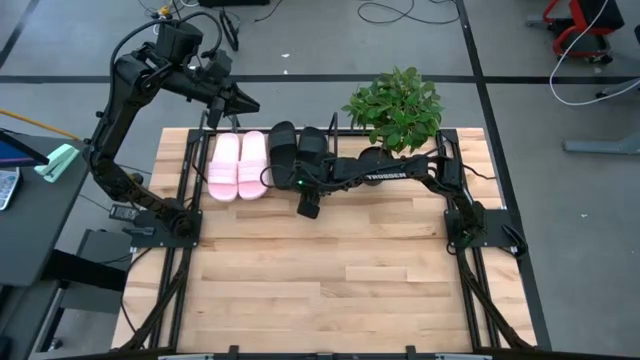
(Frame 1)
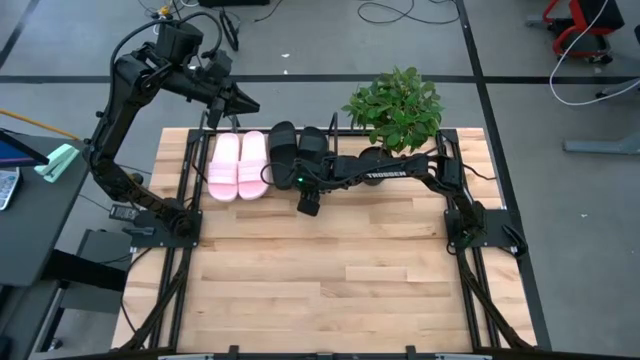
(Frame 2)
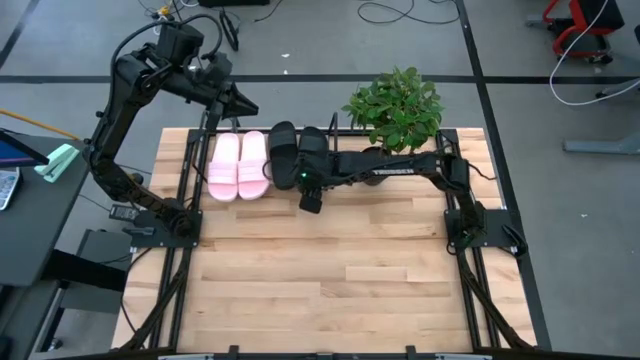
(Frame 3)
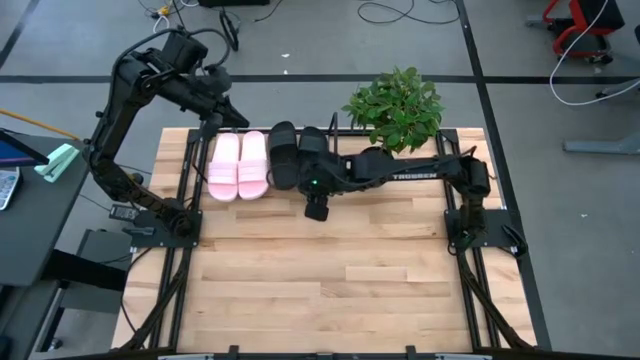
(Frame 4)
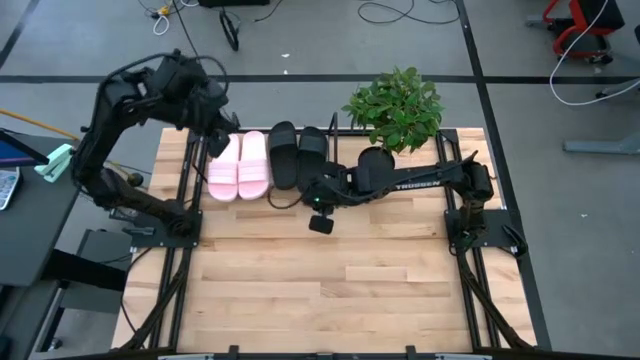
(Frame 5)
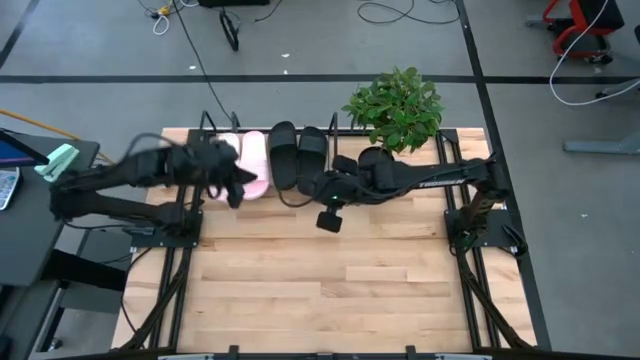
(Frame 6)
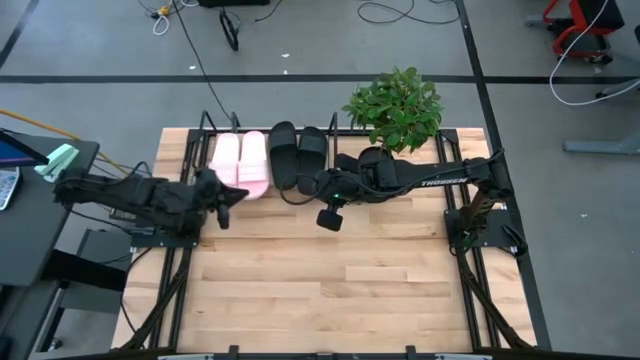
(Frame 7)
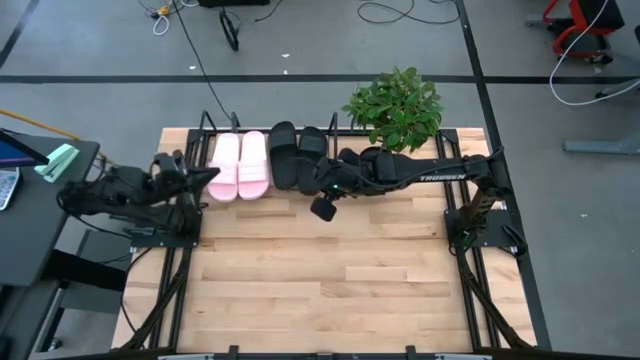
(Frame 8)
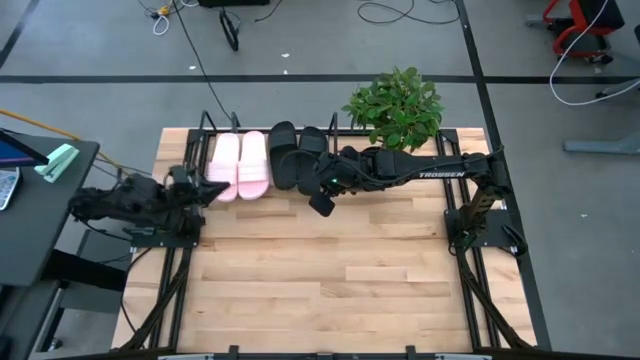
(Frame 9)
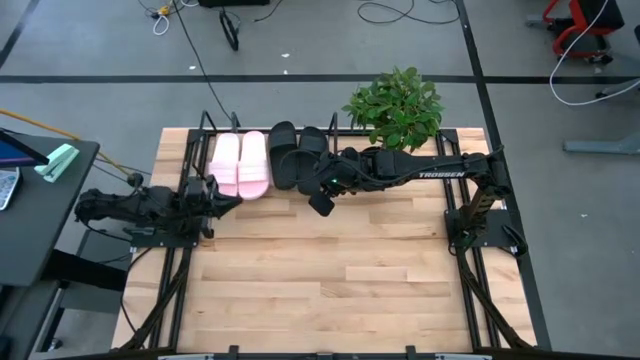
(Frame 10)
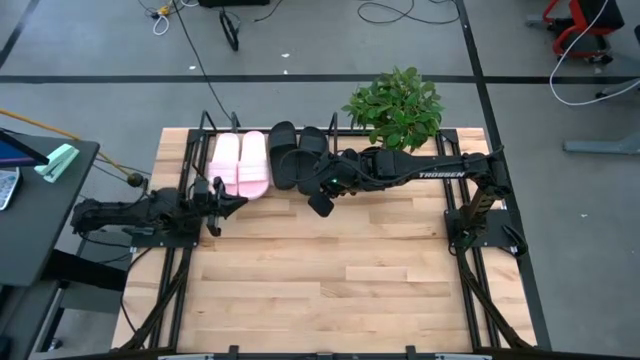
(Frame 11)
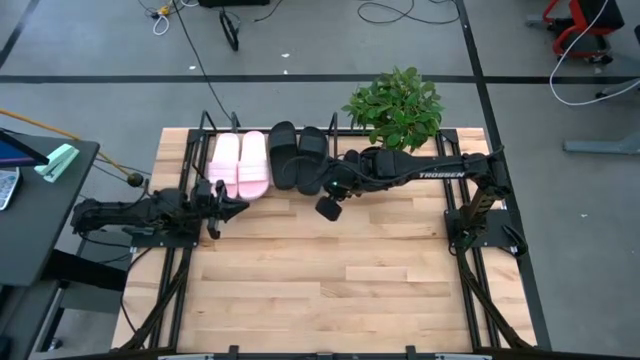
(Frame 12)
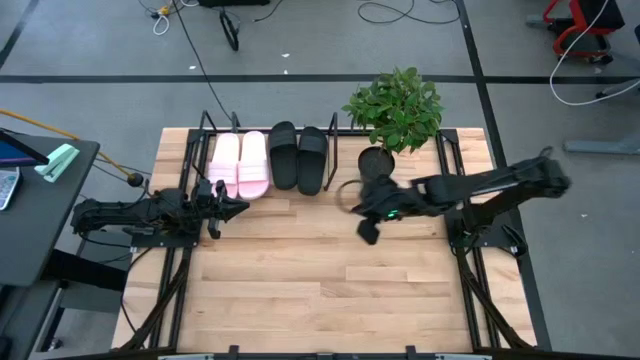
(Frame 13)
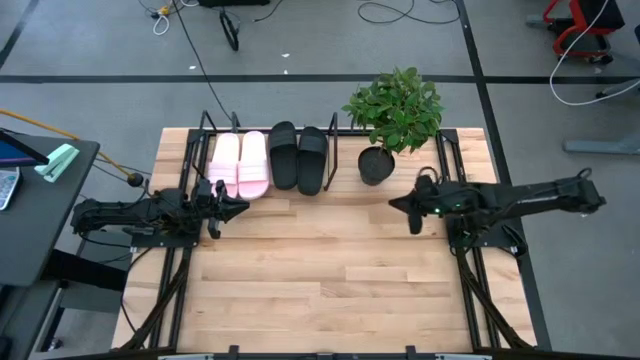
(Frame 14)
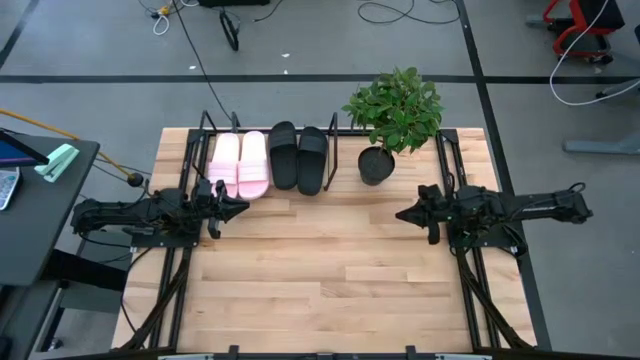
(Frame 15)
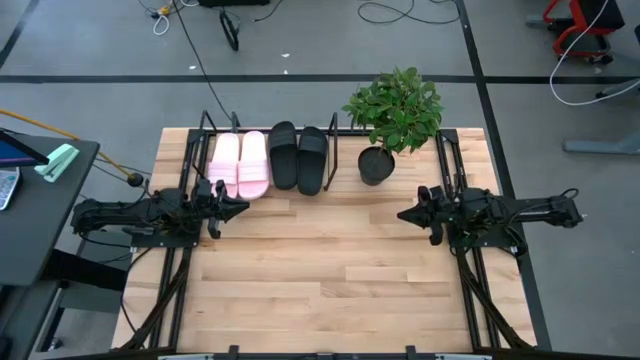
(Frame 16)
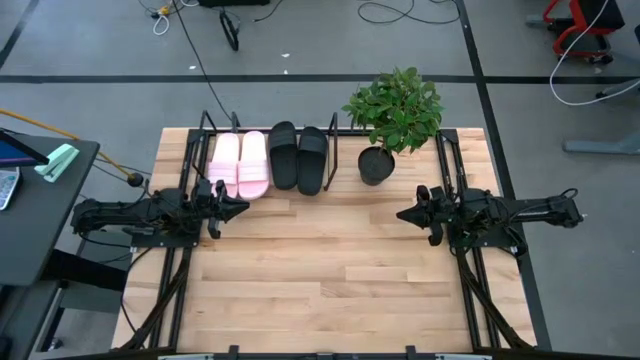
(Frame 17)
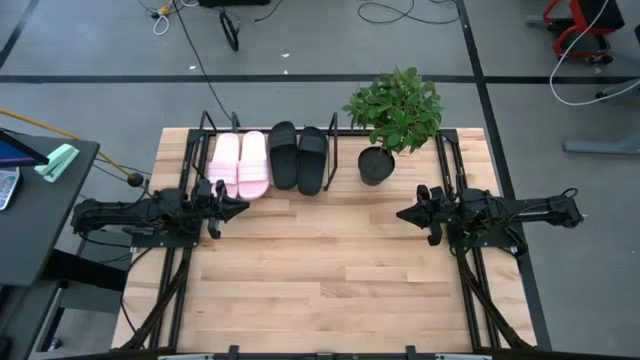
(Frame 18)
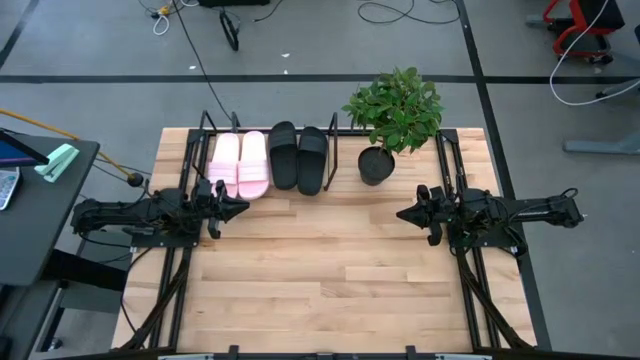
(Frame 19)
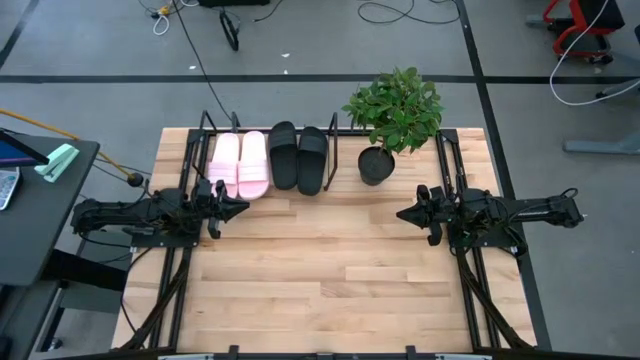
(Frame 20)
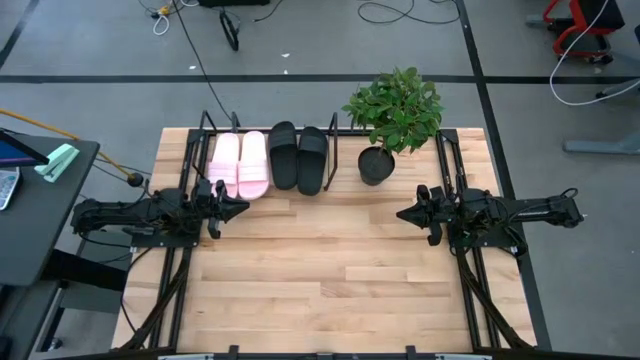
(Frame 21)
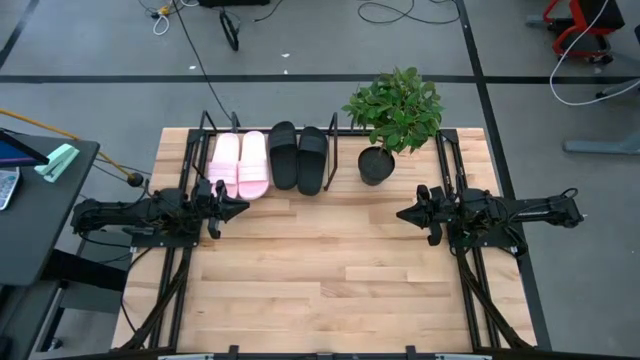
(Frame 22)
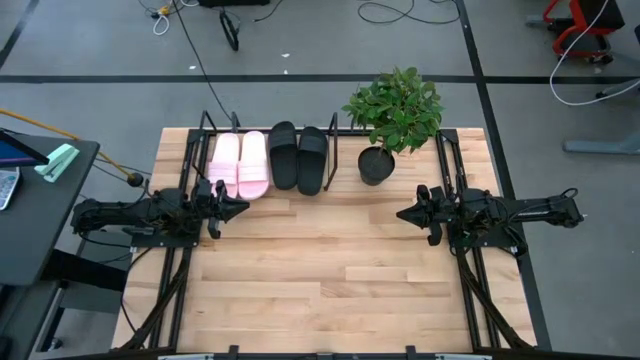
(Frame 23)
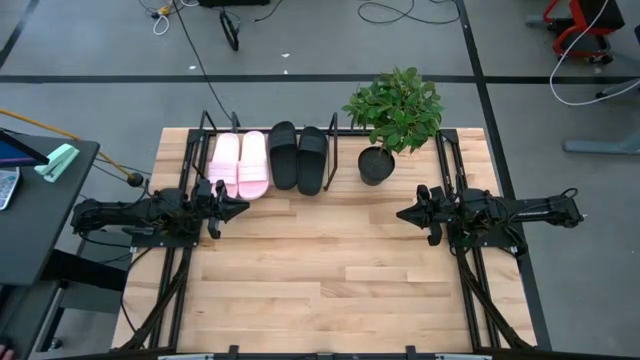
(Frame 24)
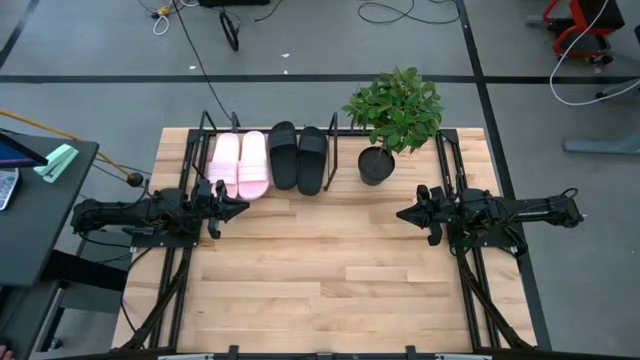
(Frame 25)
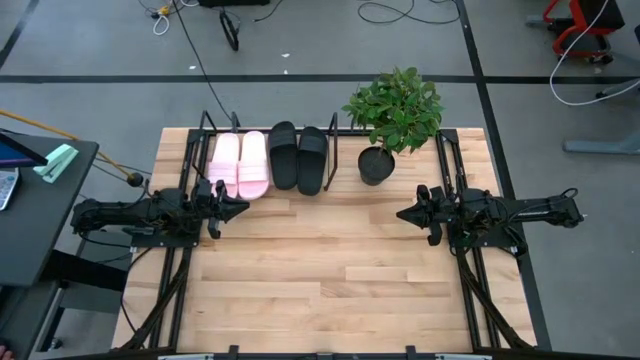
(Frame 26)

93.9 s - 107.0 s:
Task: Pick and place slides into the shelf
Return to Home Position

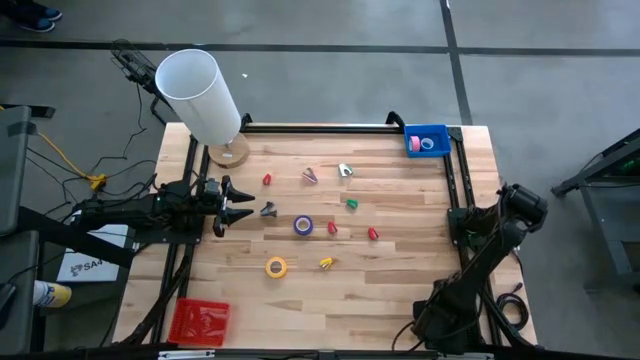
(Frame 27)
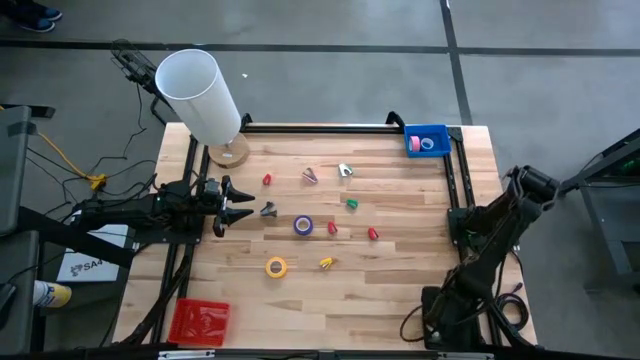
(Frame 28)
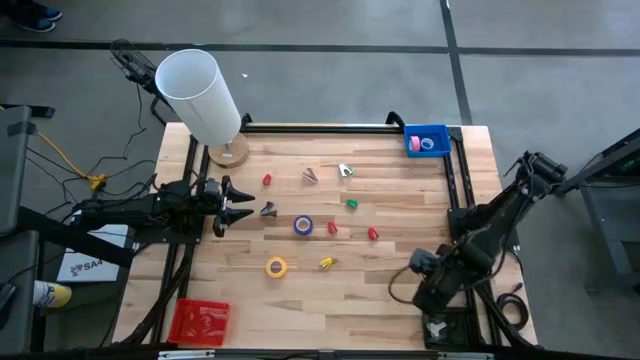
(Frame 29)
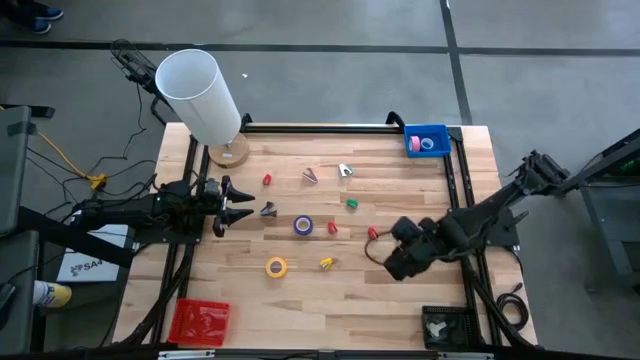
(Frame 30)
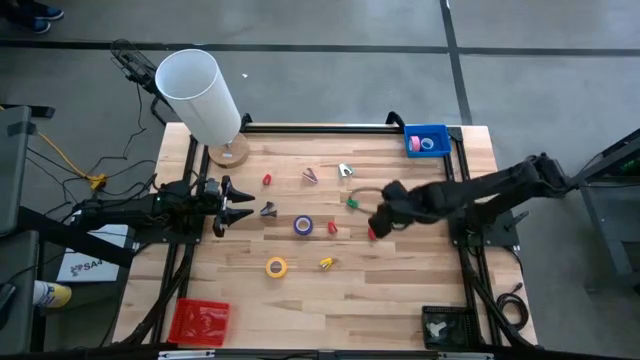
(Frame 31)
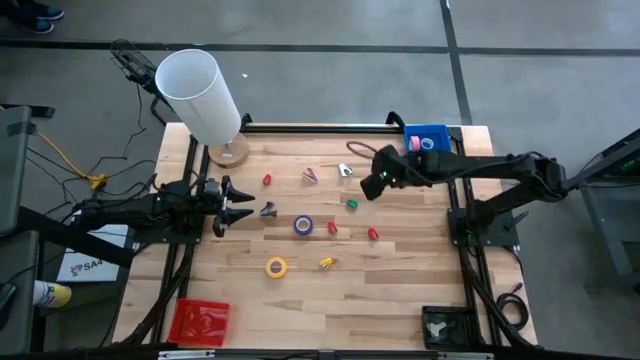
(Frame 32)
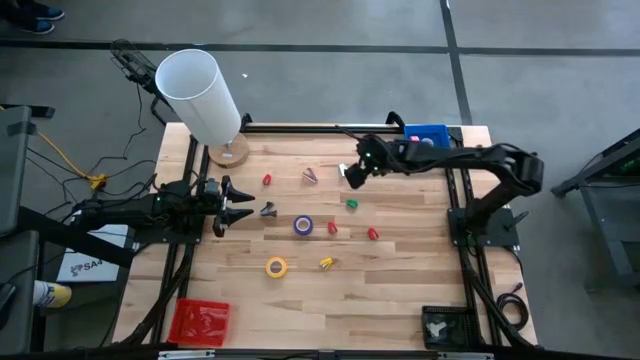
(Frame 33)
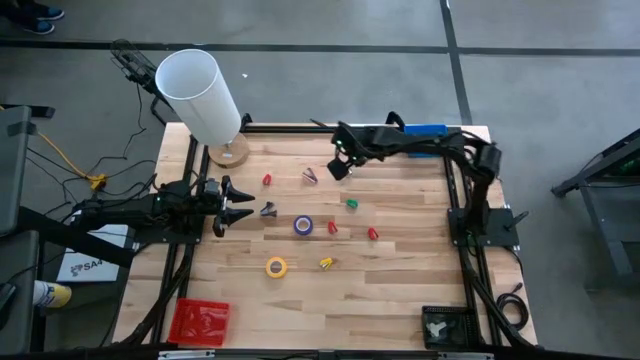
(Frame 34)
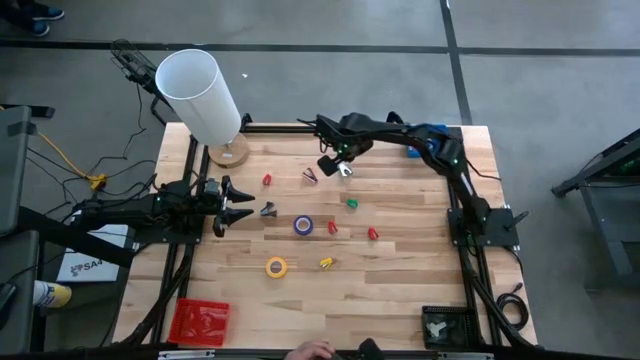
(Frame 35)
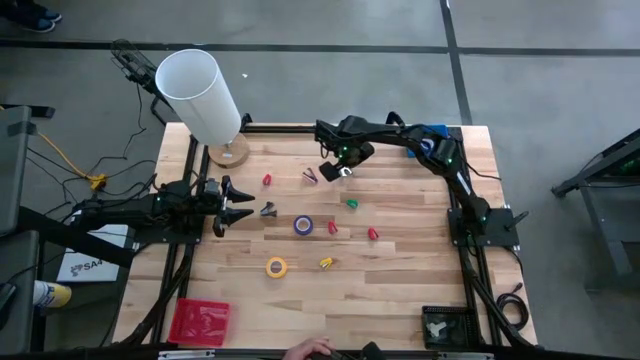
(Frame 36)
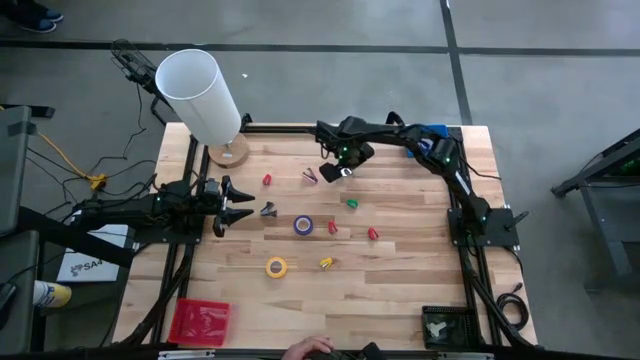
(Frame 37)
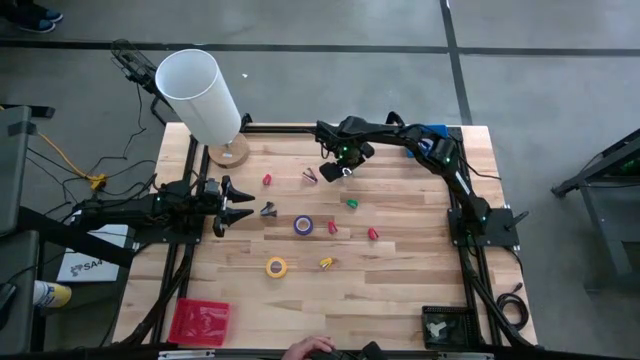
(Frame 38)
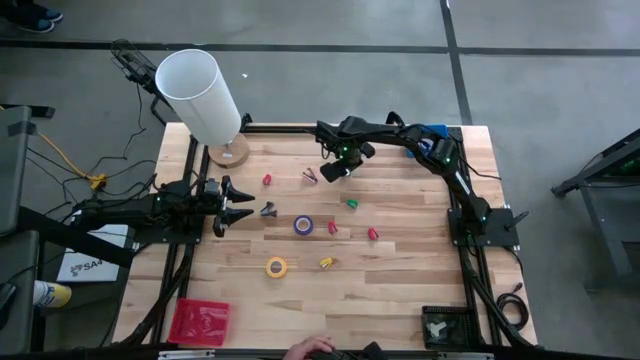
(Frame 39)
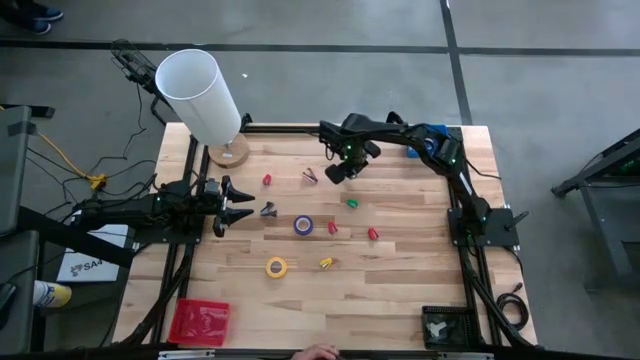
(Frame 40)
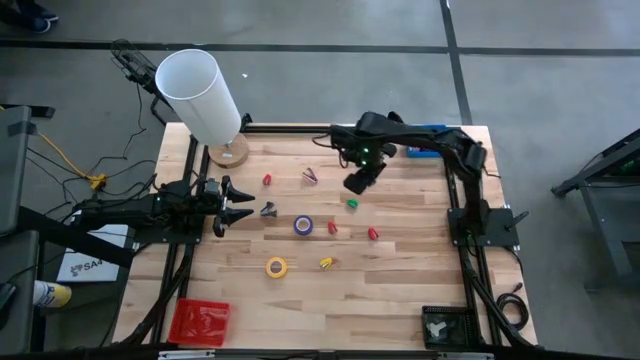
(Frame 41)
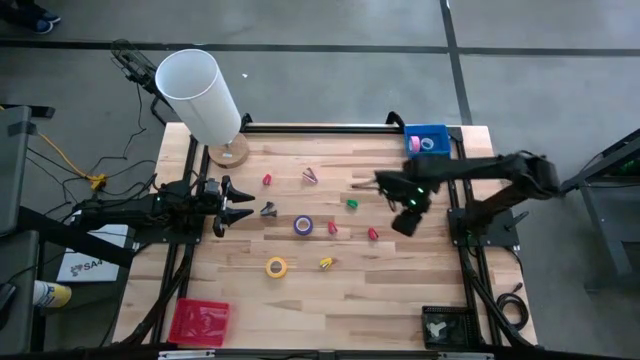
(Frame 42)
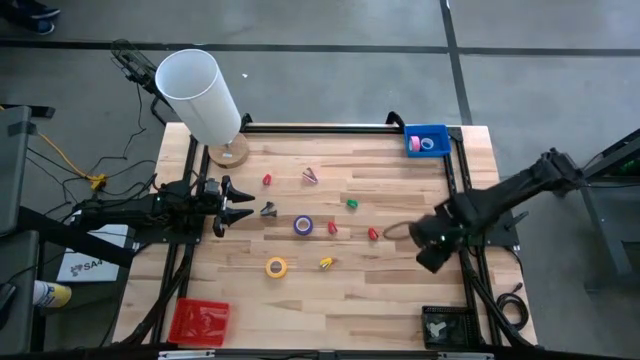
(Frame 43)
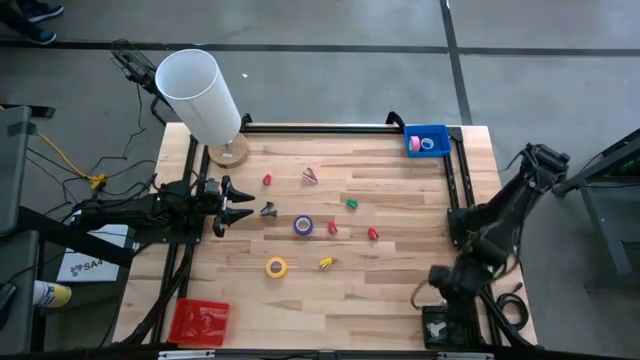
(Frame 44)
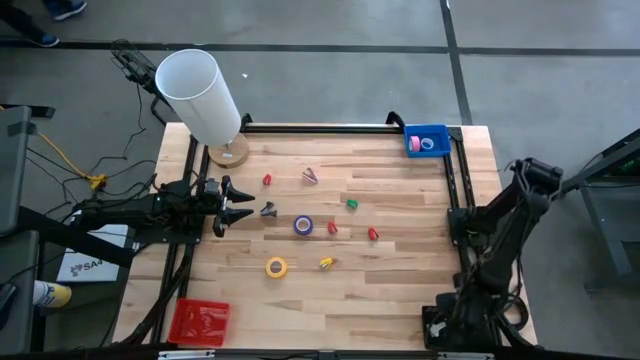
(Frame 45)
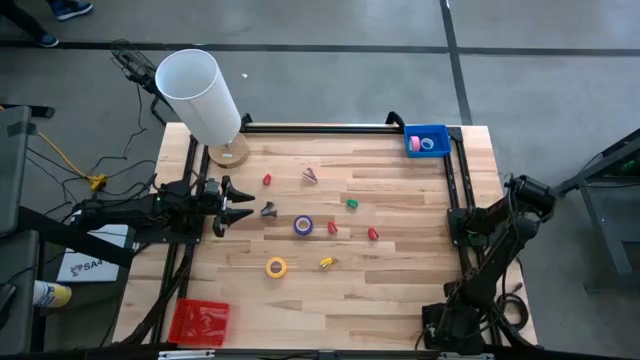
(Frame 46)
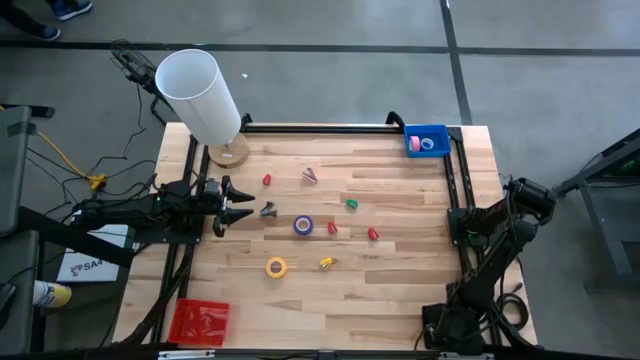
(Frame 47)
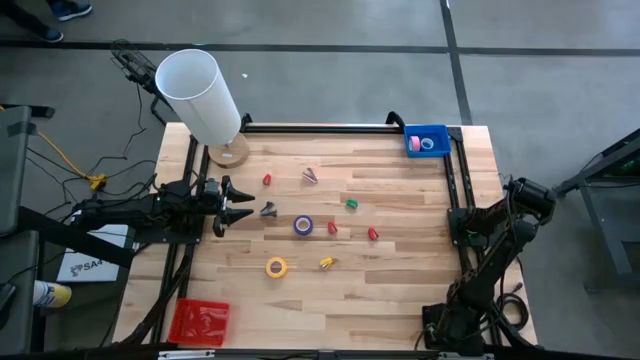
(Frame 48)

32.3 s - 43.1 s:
Task: Pick and place Stapler, Stapler remover, tape
Put the blue staple remover into the black bin
